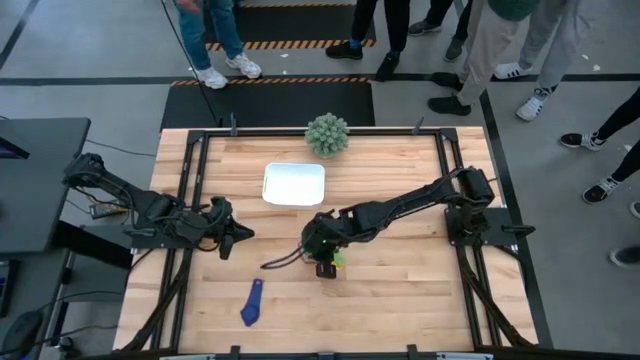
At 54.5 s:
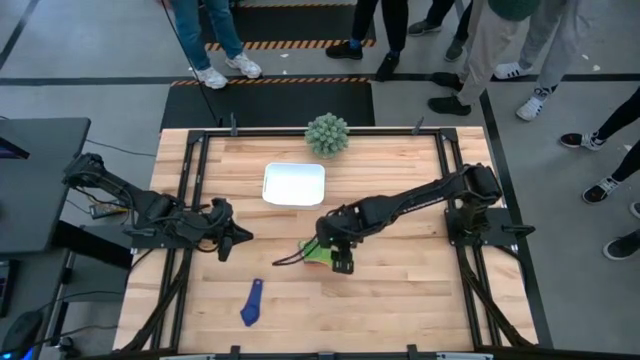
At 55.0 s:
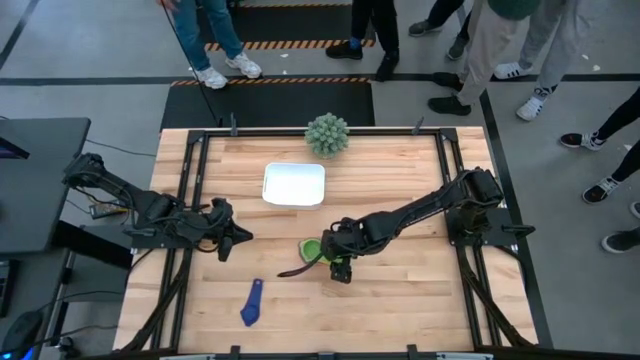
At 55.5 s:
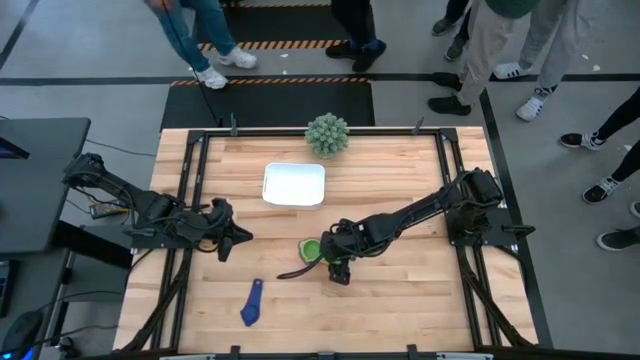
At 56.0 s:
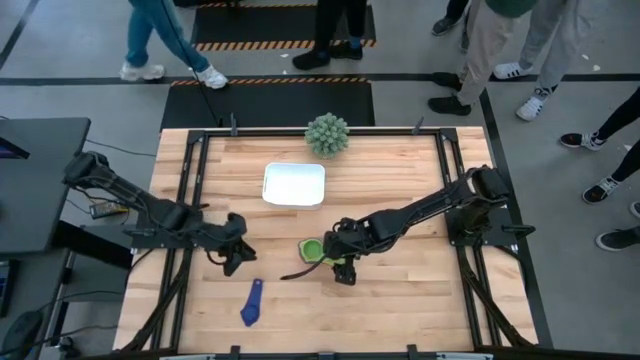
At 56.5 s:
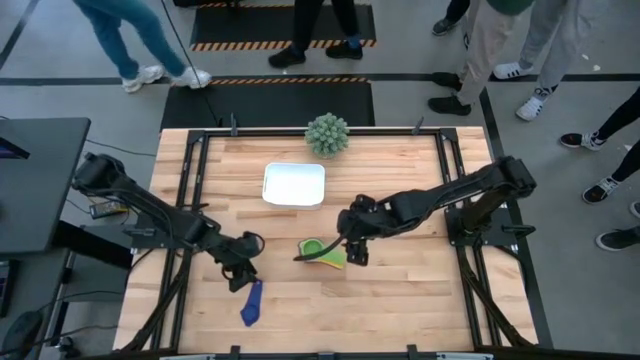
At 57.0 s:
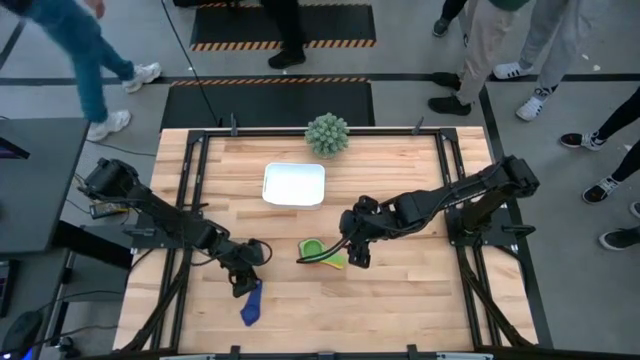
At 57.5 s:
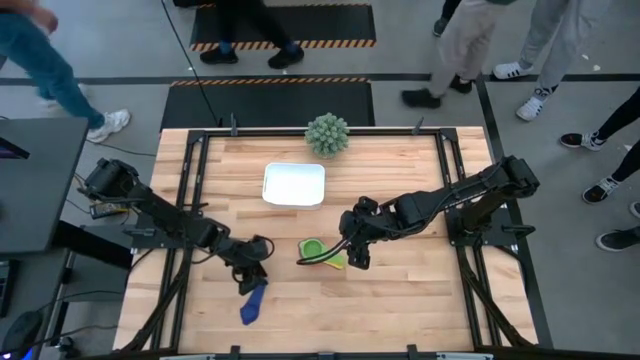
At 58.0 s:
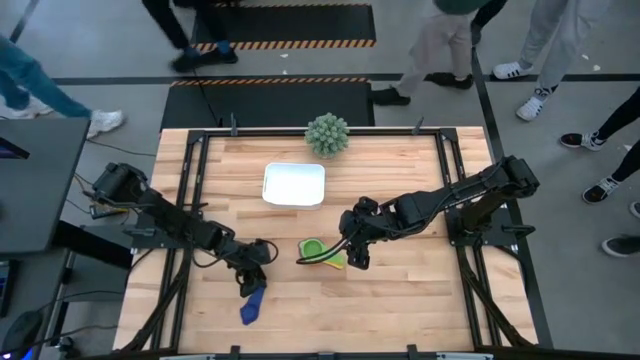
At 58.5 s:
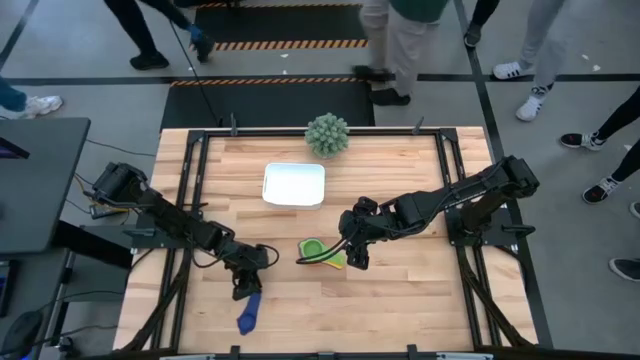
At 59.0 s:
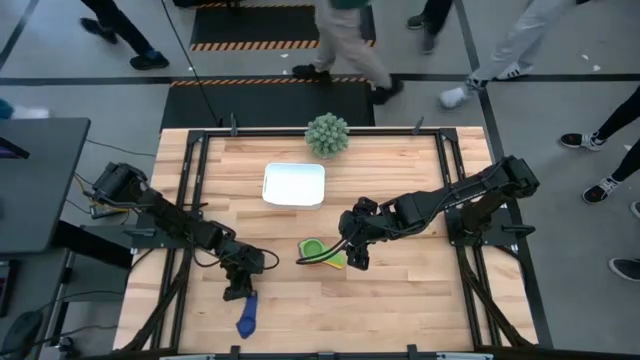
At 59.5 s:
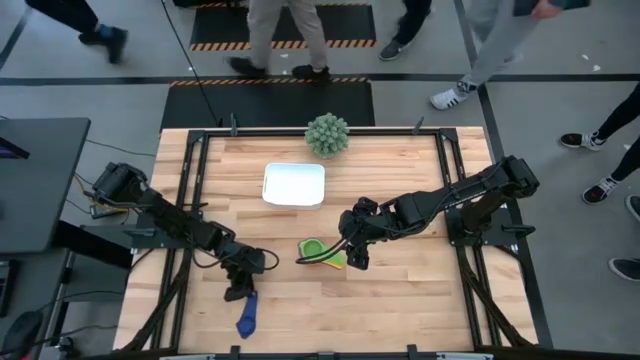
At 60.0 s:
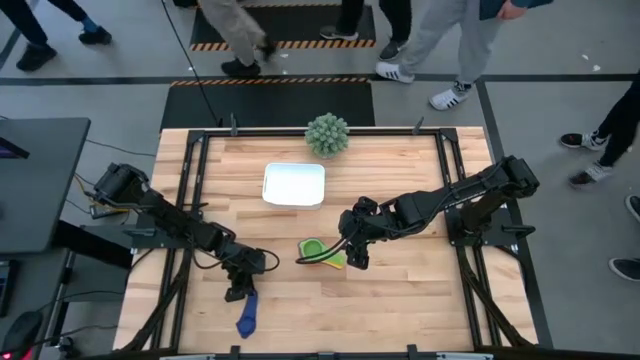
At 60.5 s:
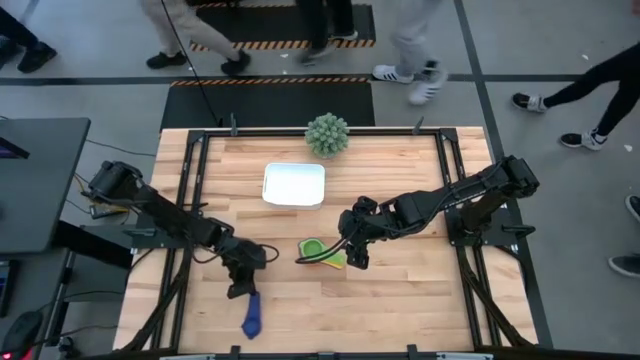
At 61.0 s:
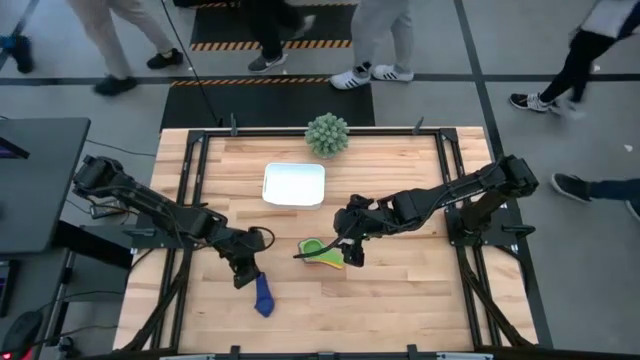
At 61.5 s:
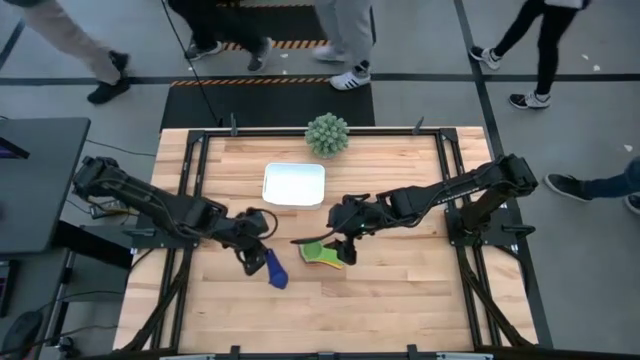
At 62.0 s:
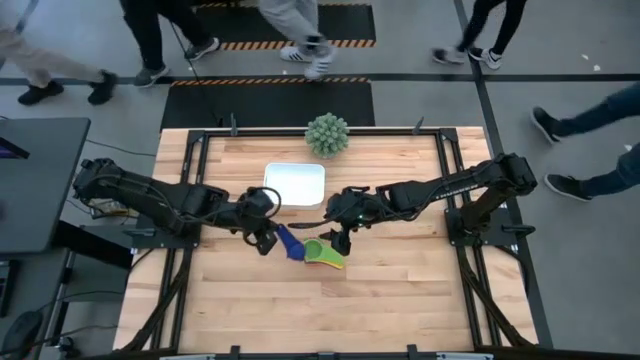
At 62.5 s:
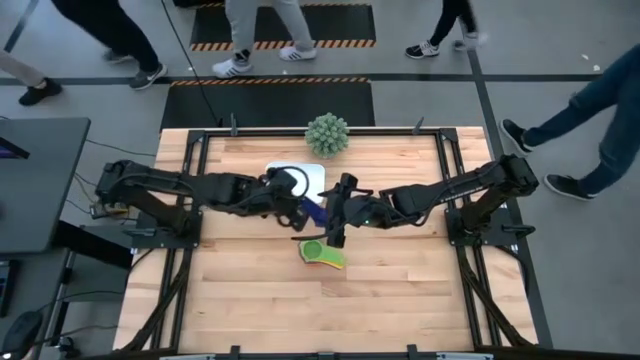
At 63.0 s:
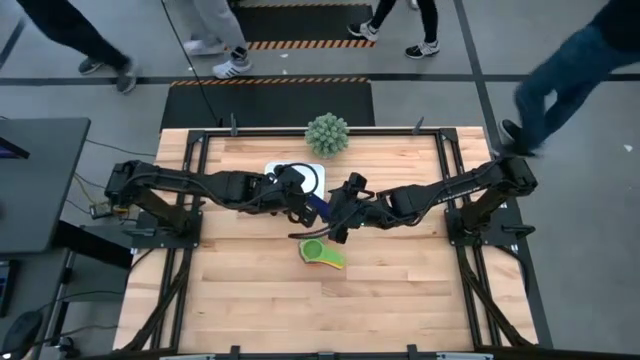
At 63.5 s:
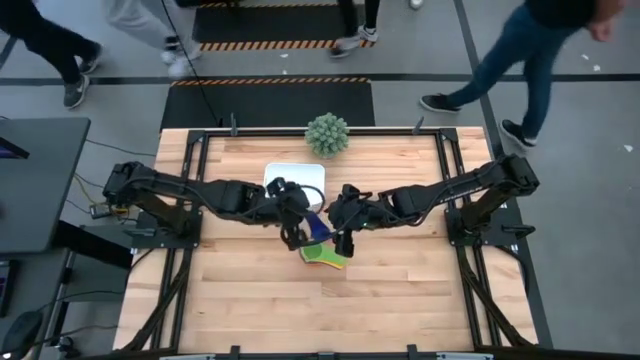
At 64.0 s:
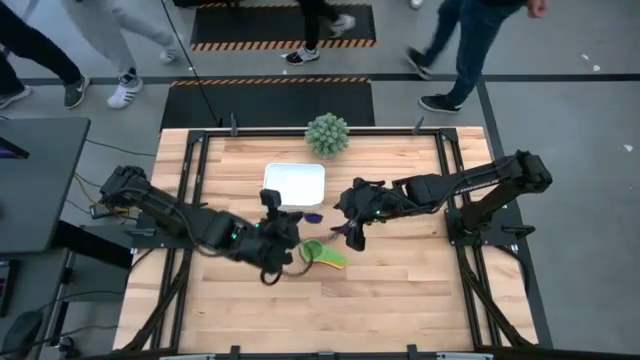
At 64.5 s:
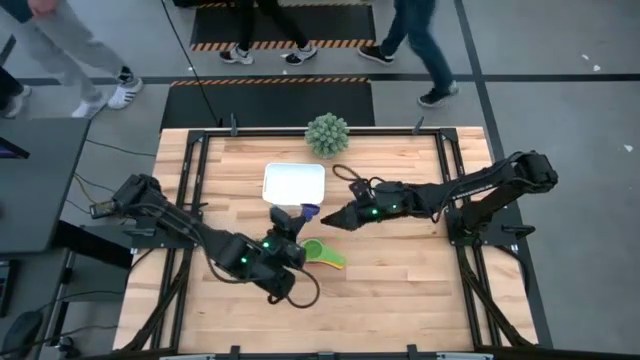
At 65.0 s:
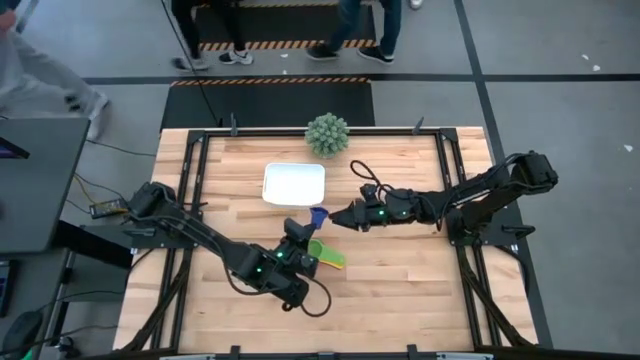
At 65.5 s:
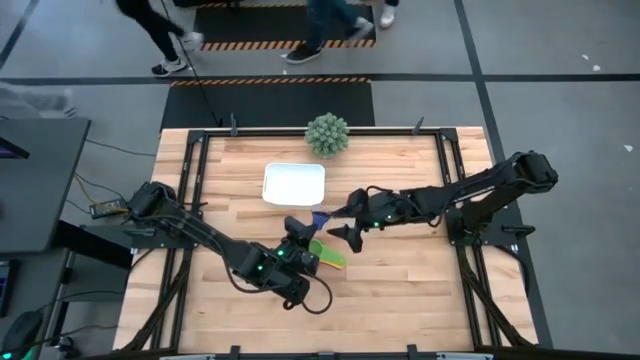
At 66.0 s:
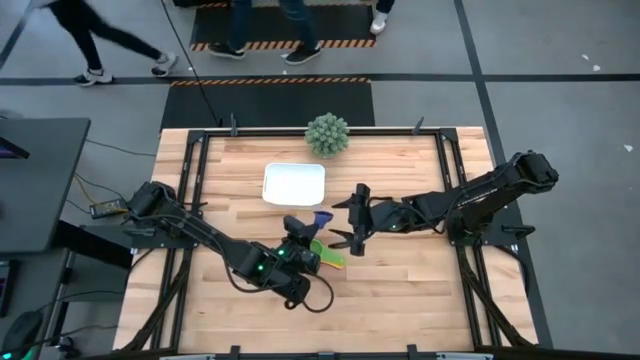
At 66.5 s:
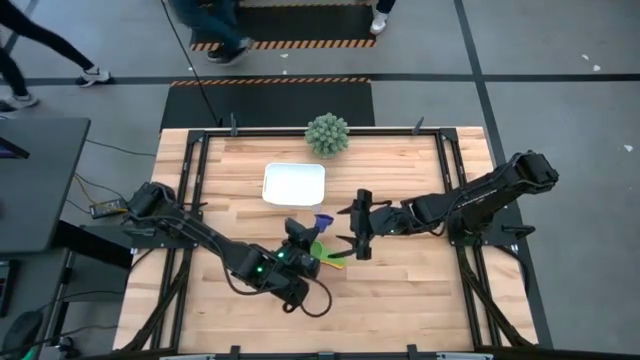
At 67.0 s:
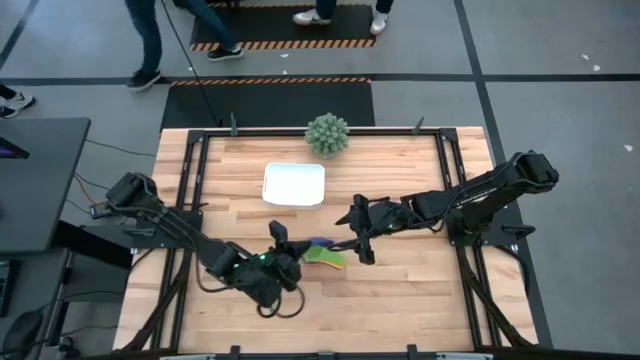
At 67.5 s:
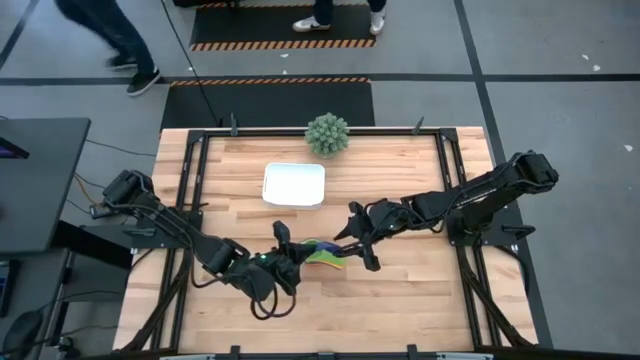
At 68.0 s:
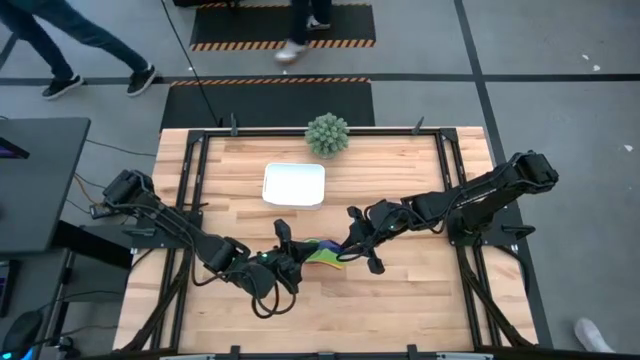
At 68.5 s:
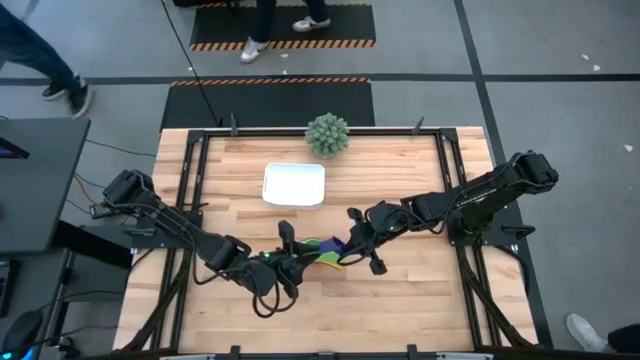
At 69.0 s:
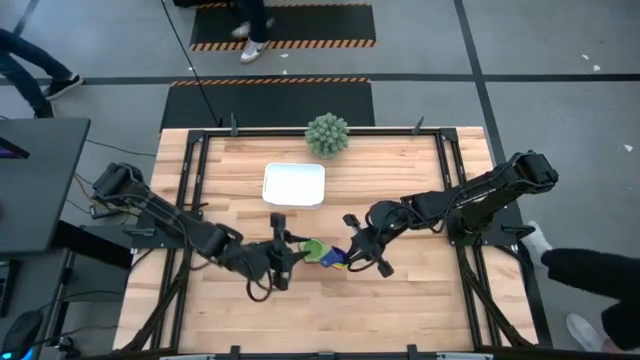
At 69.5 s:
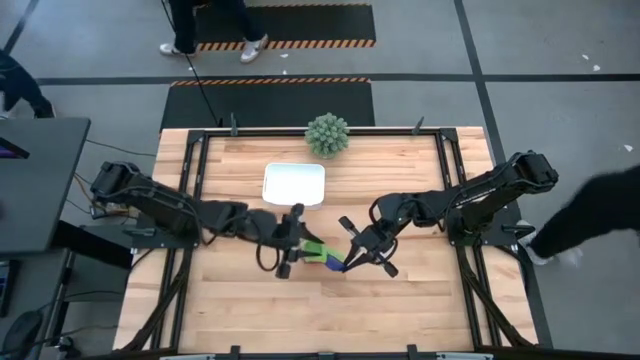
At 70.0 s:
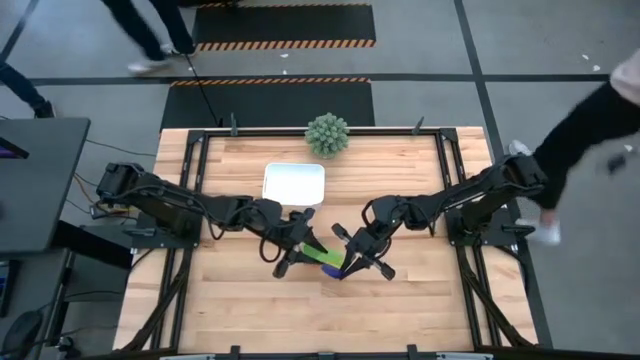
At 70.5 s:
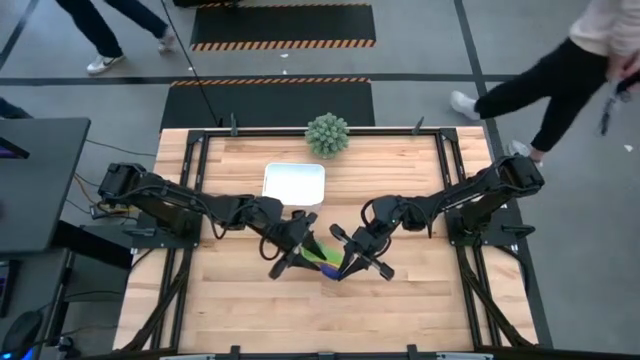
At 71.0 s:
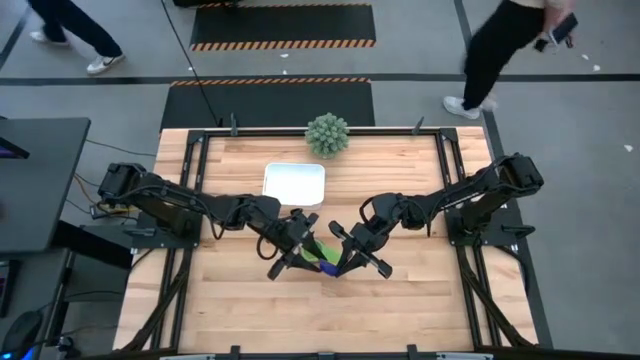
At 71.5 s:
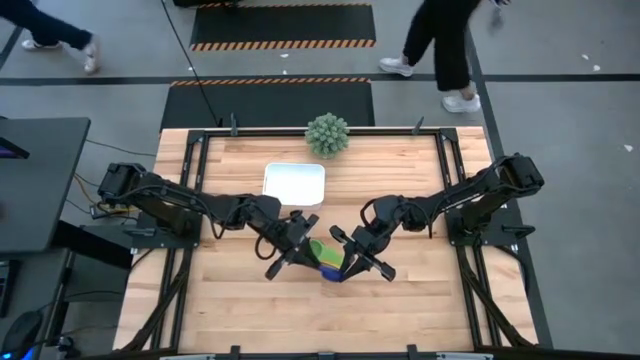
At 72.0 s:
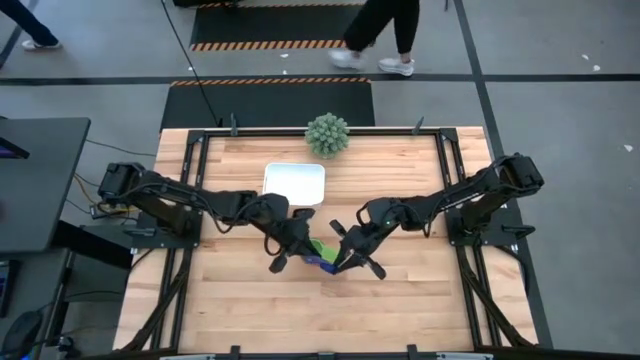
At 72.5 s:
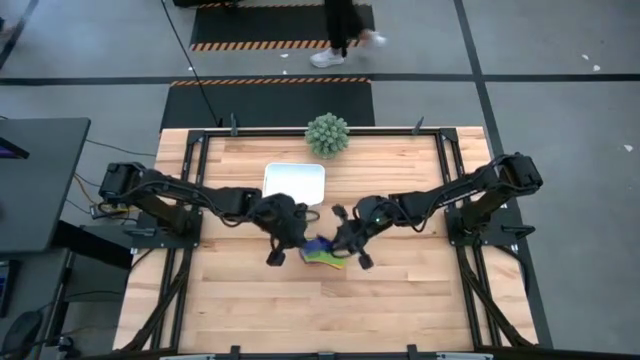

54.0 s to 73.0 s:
Task: Nest measuring cups in basket
Stack the blue measuring cup on top of the green measuring cup

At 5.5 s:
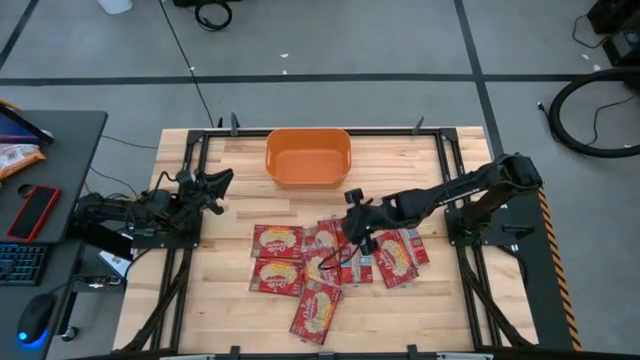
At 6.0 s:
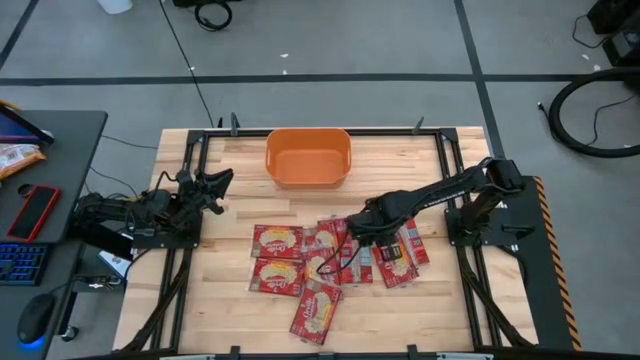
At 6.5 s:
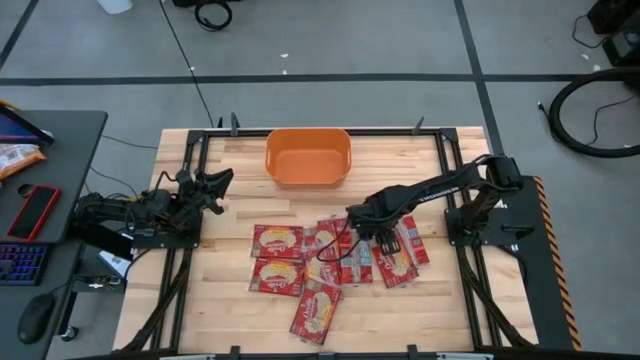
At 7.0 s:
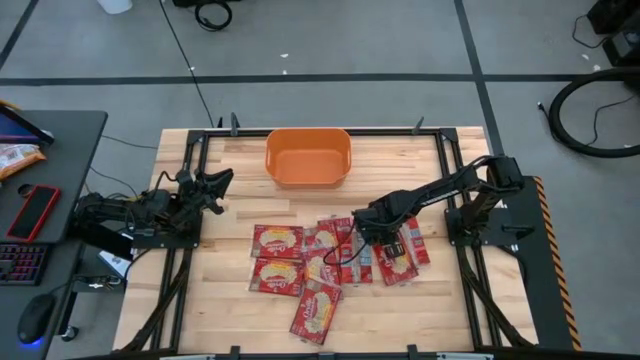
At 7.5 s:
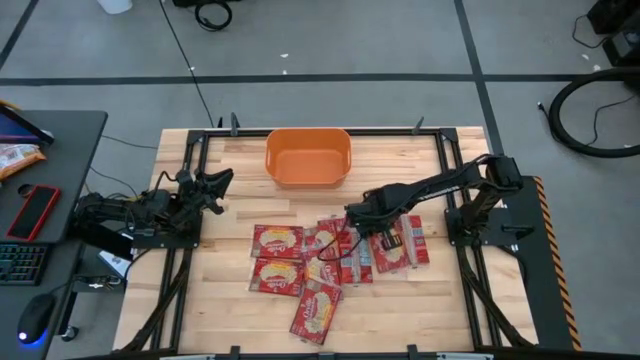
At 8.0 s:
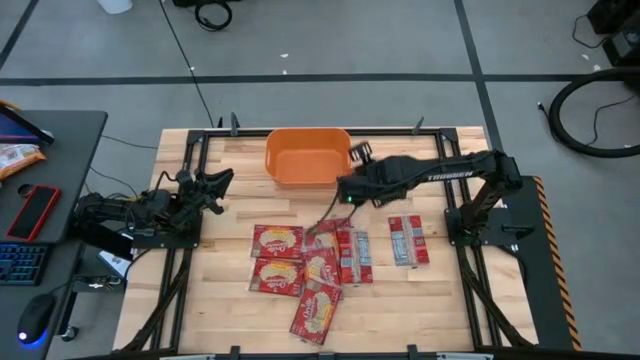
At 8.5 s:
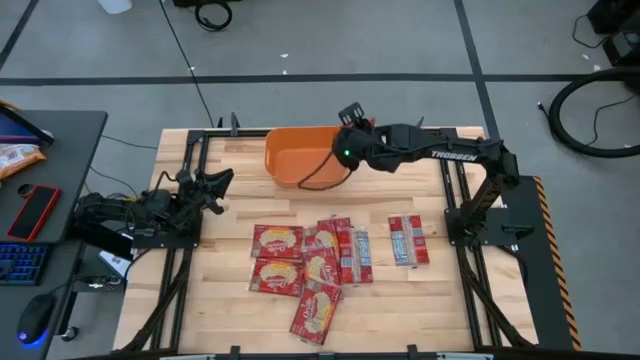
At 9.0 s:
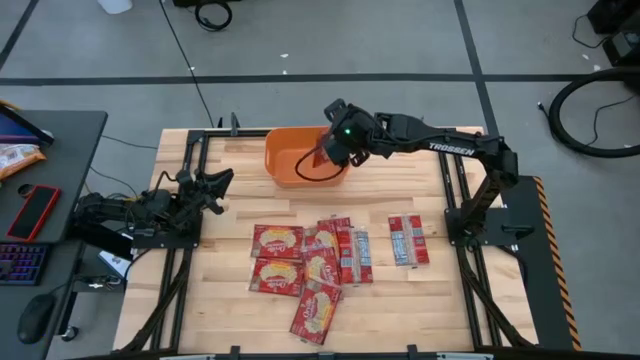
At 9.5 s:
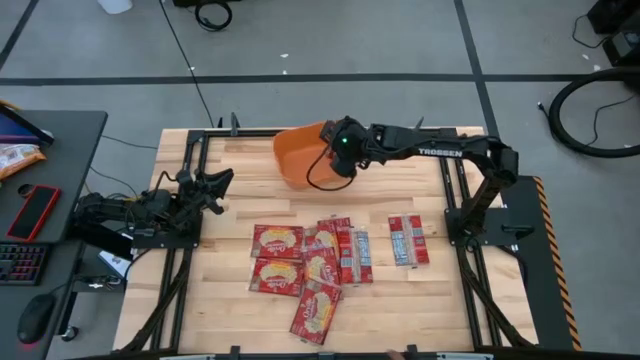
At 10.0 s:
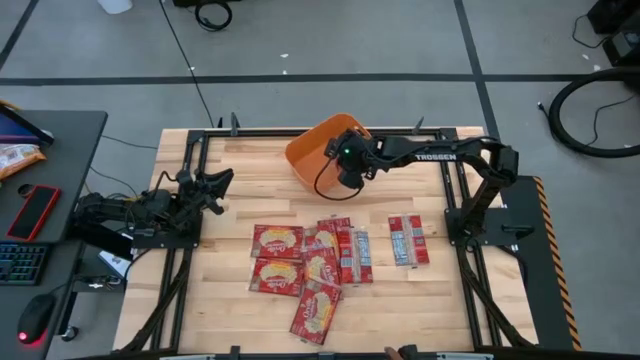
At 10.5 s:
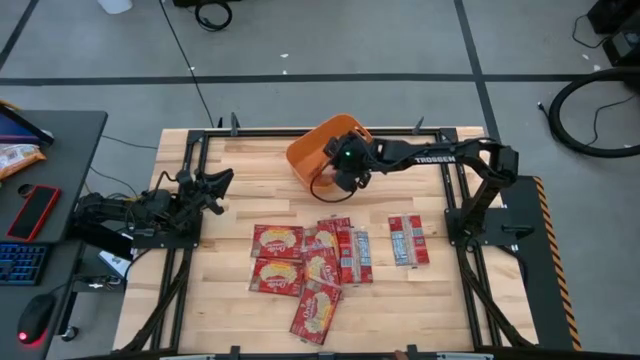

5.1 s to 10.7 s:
Task: Sort popcorn bags into baskets
Put the popcorn bag into the orange container
